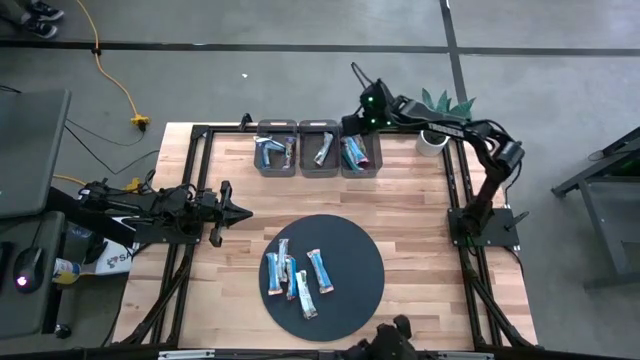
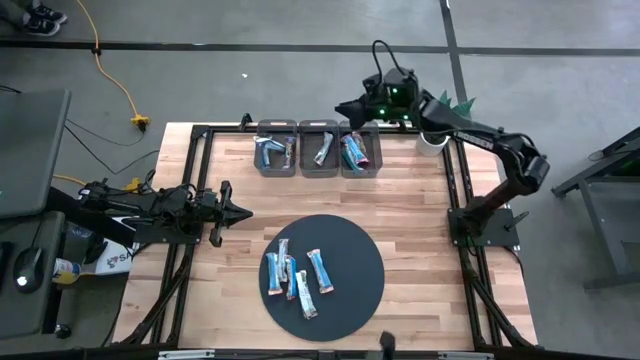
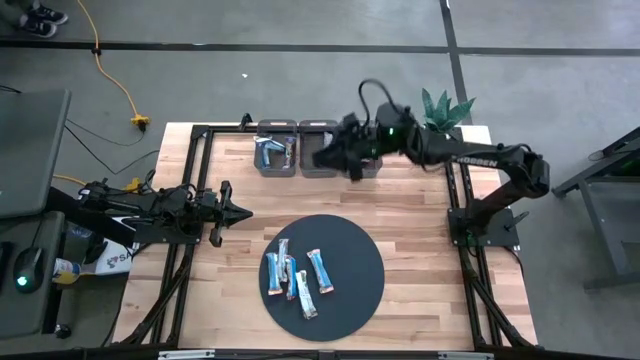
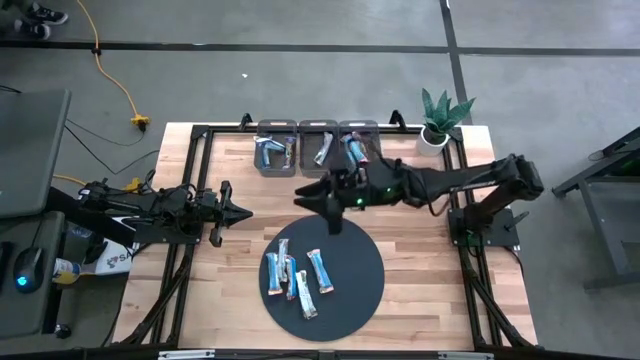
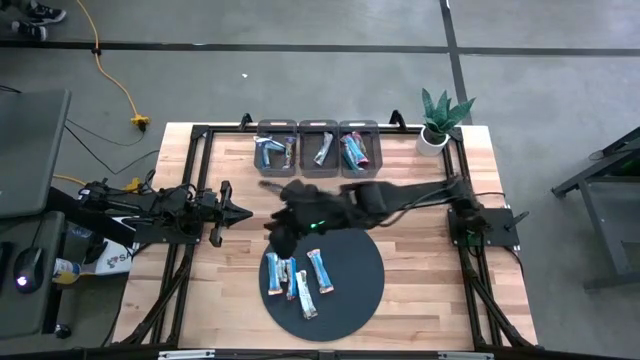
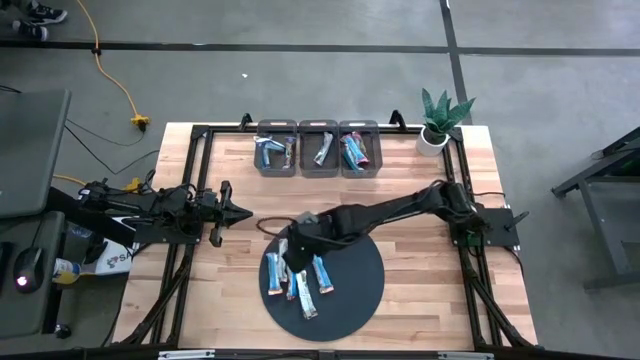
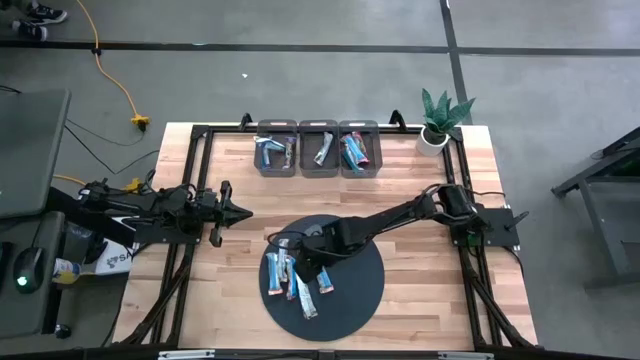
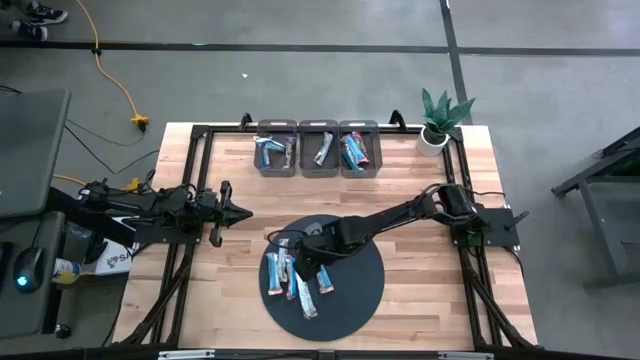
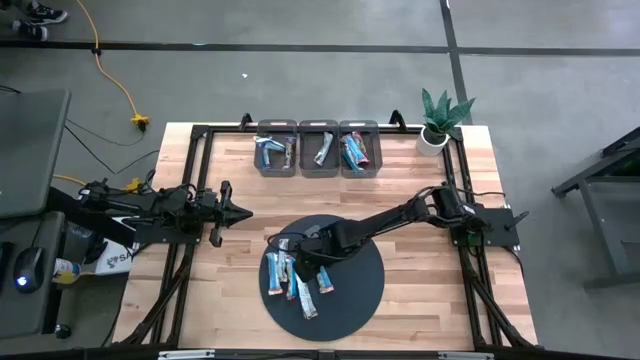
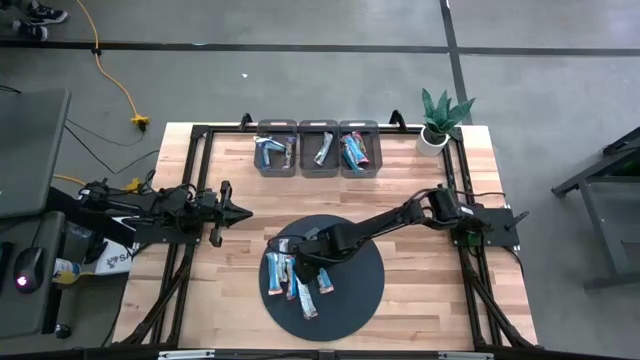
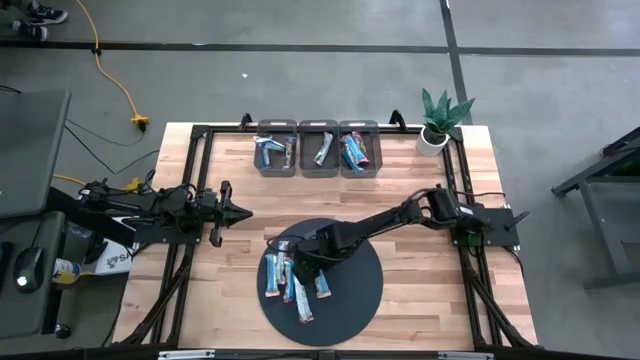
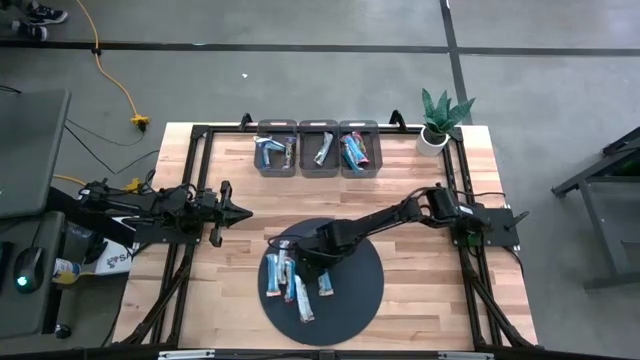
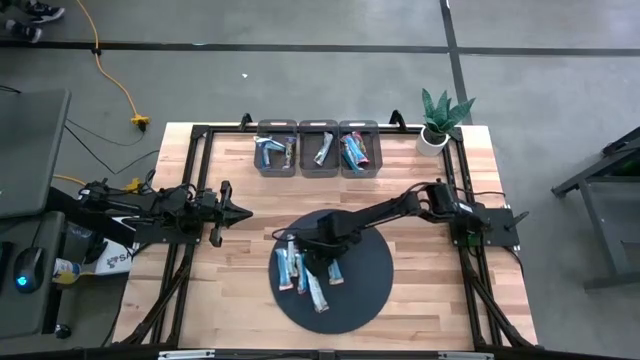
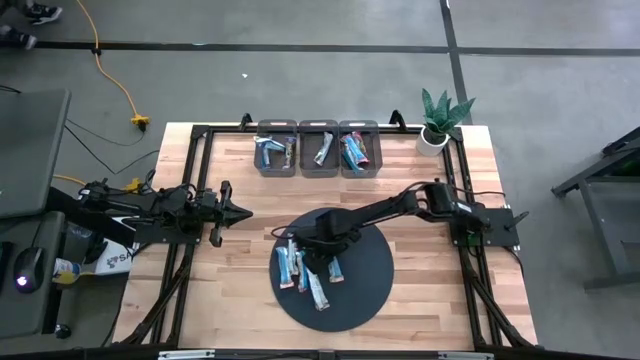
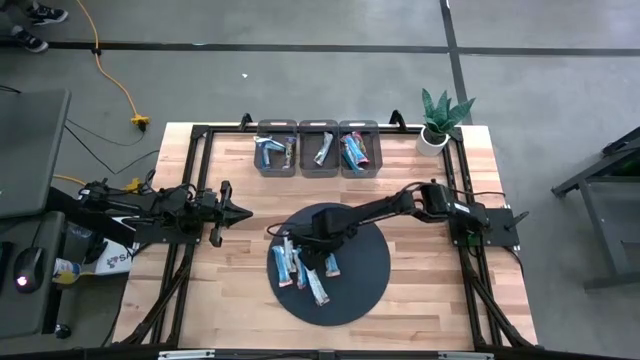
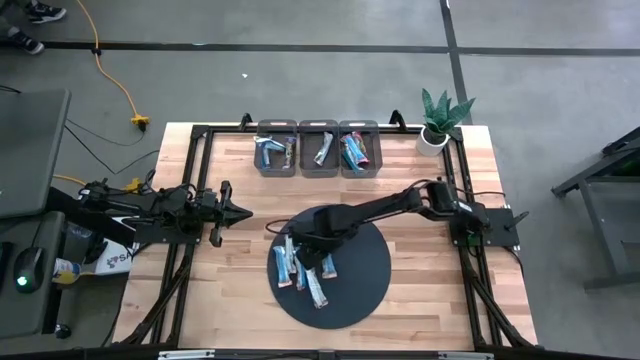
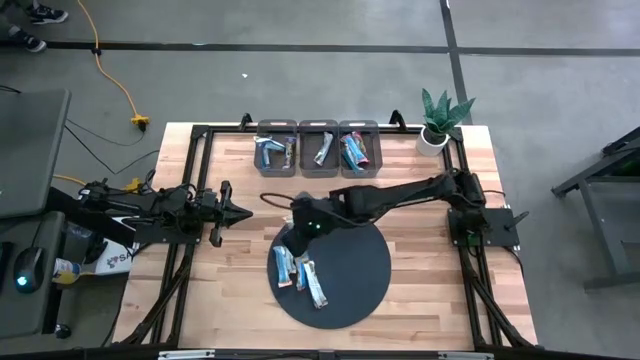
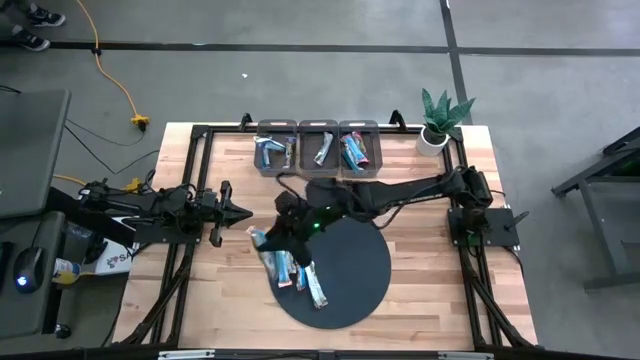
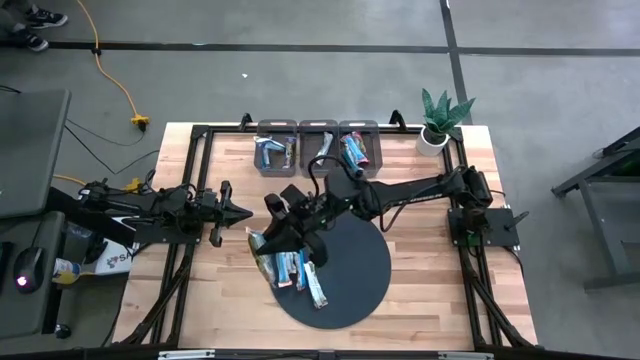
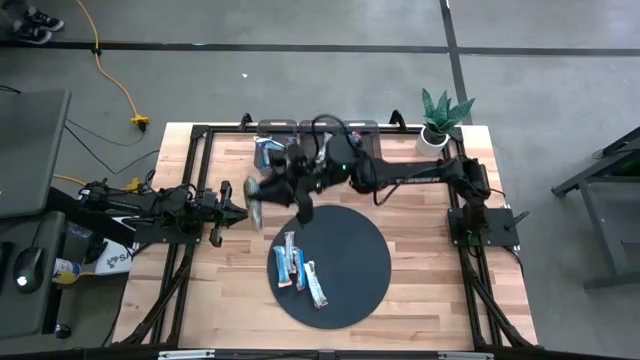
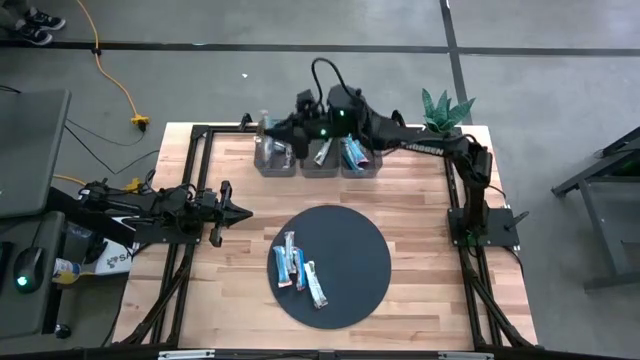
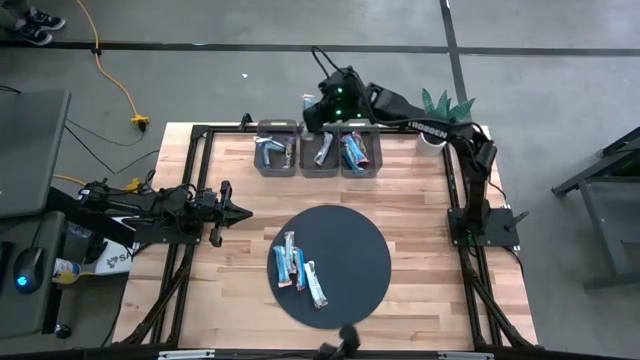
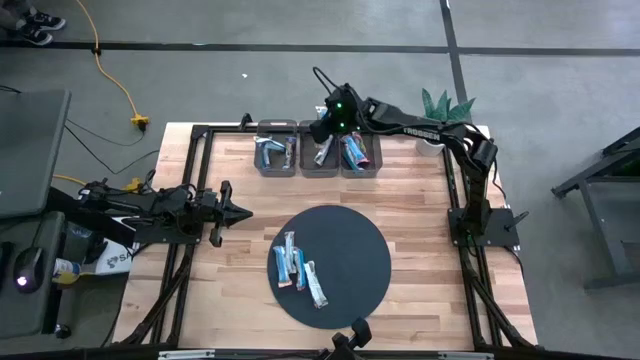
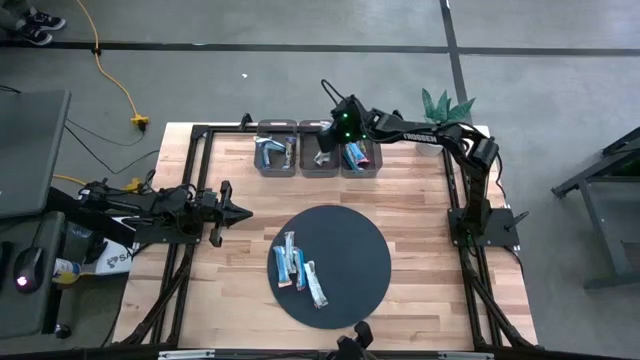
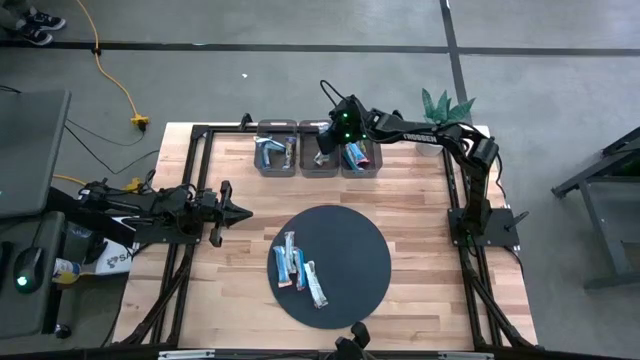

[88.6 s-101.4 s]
Task: Pick and place Granola Bars by type
Put the yellow granola bar into the middle black bin

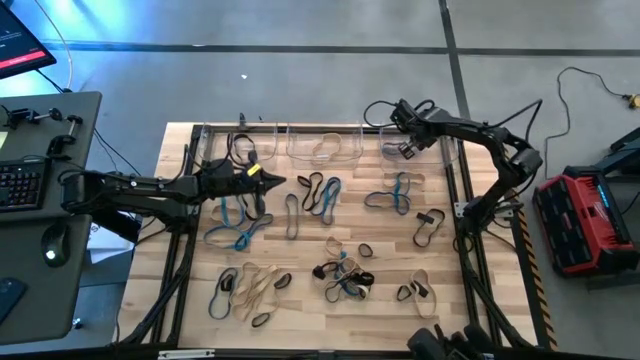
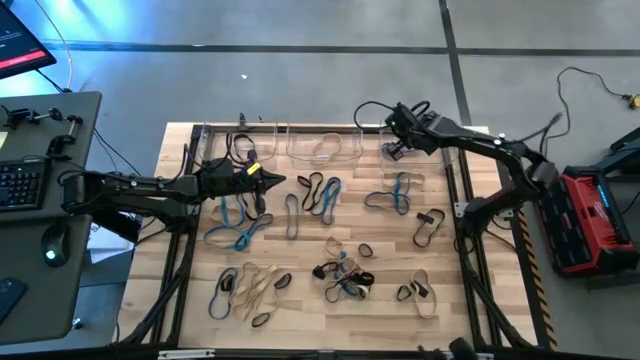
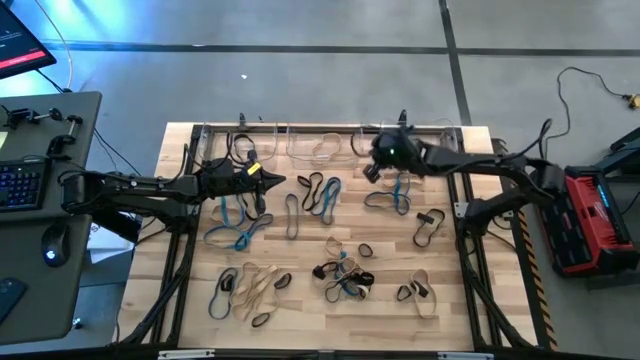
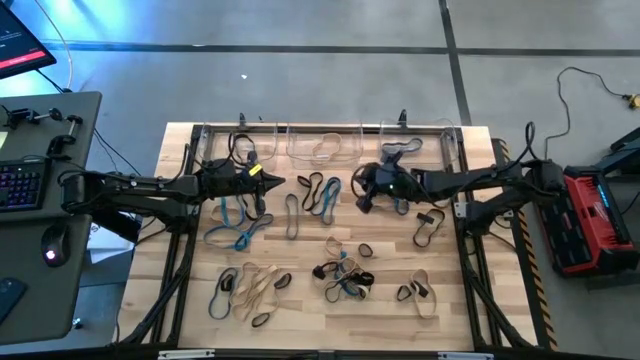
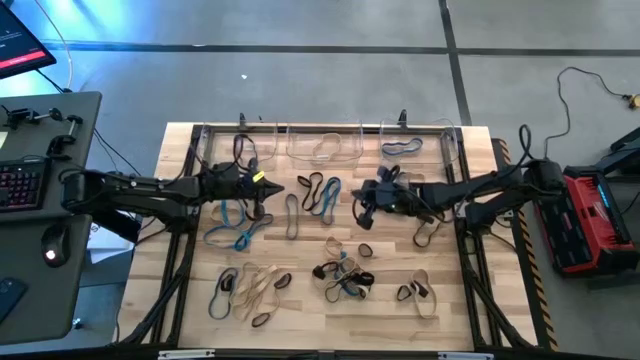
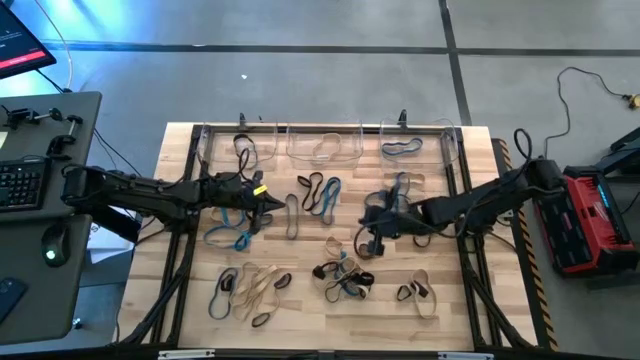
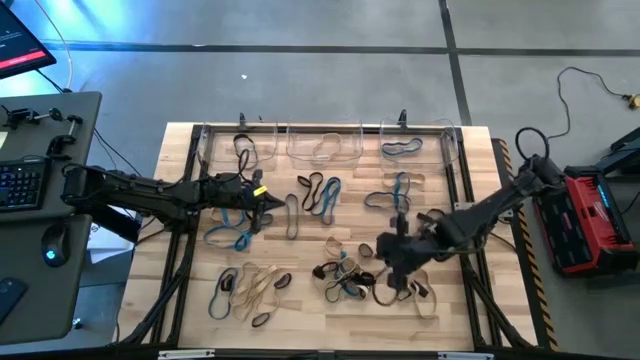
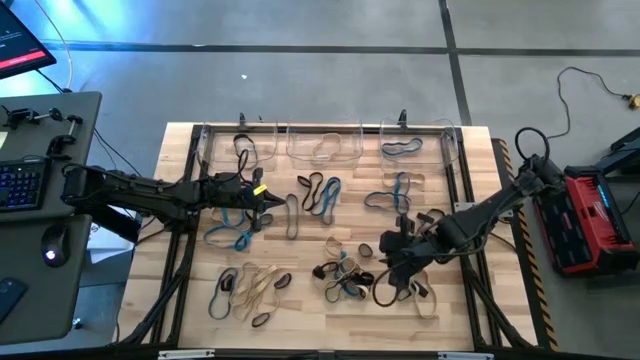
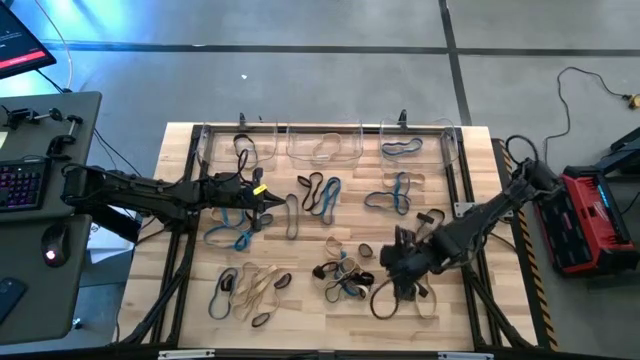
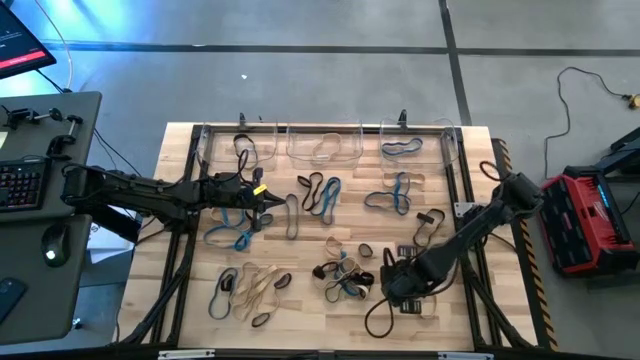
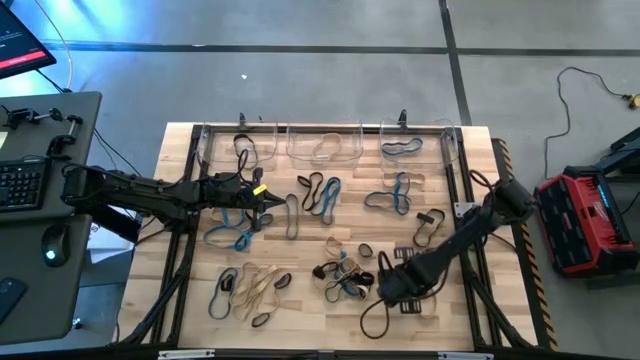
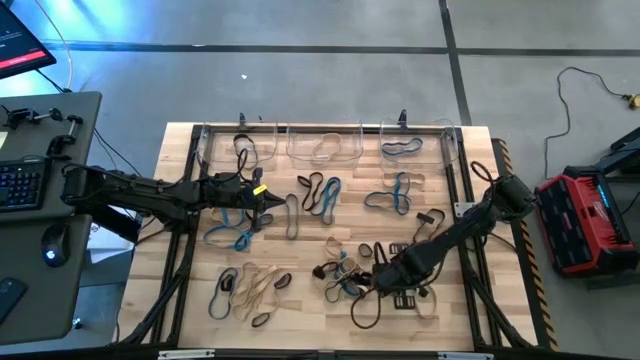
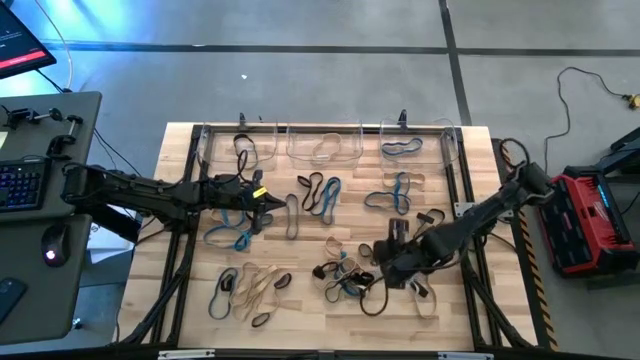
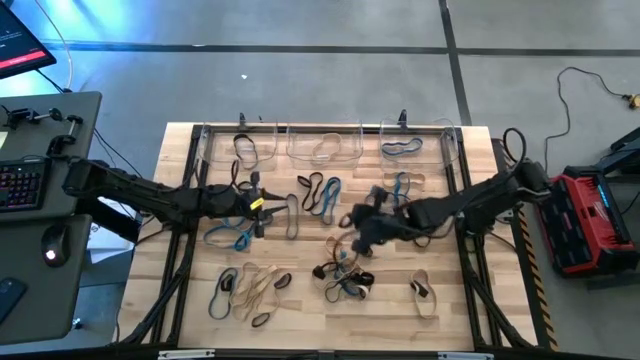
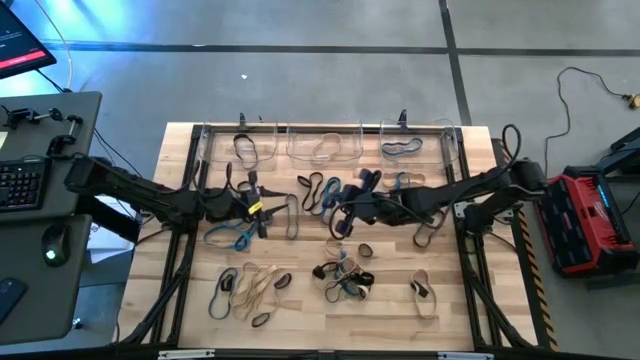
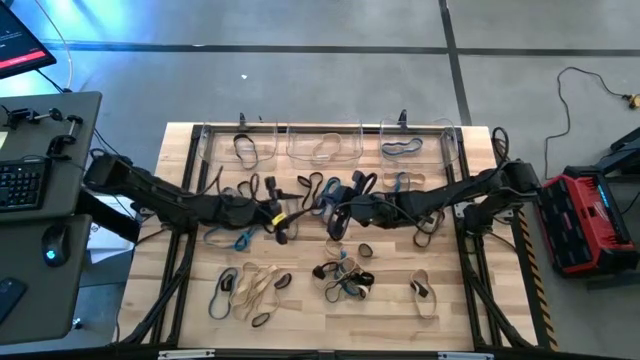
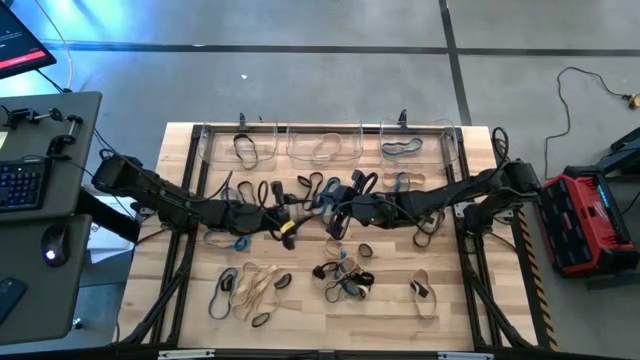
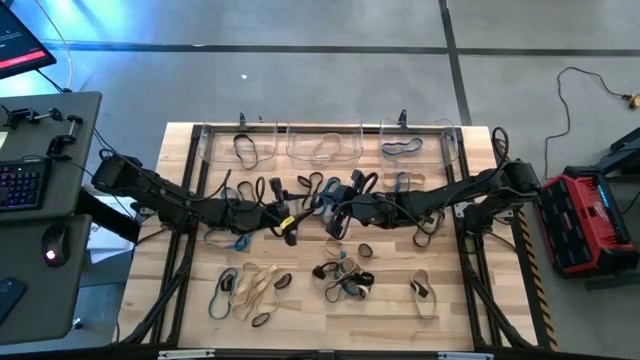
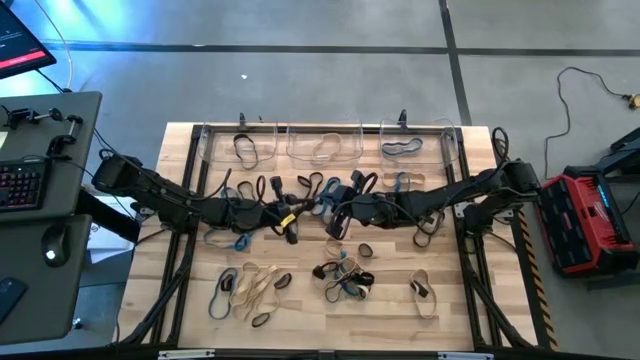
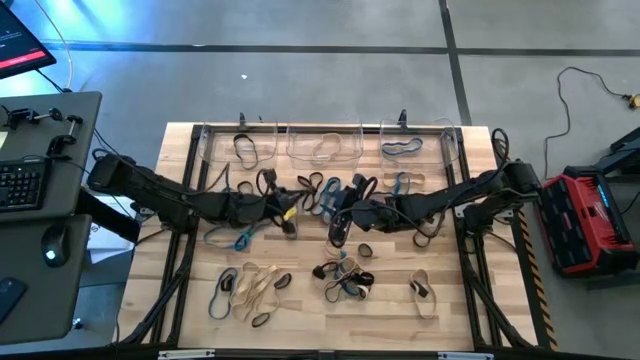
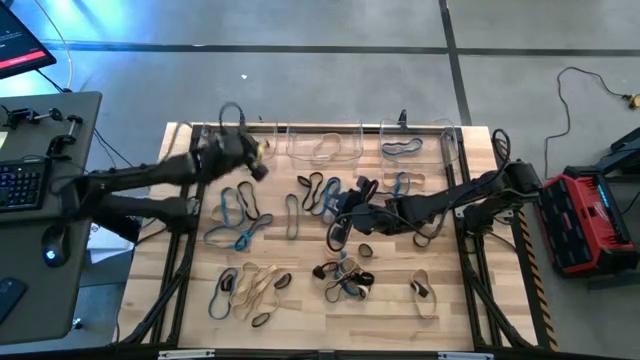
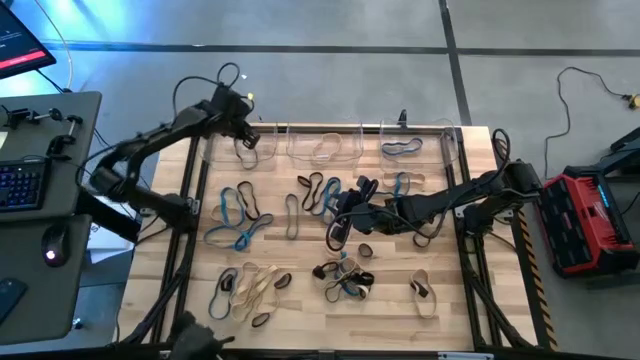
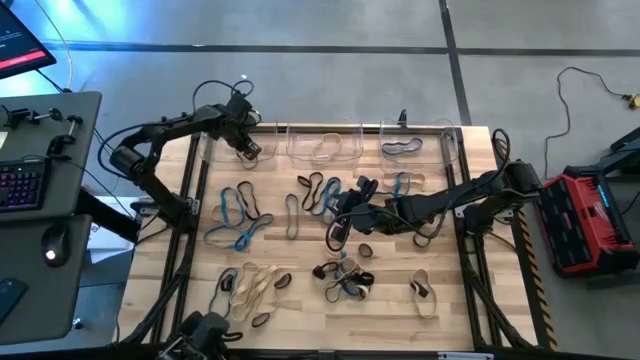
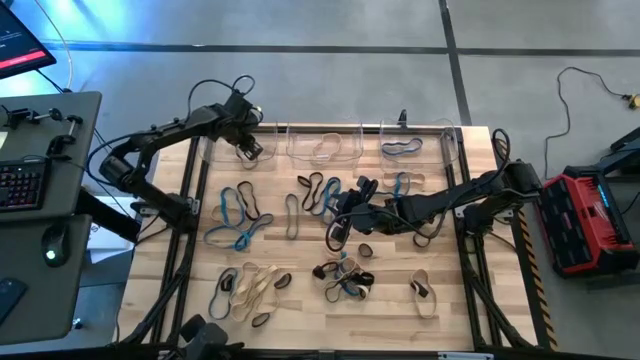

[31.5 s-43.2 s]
Task: Sort rubber bands into baskets
Put the black rubber band into the left transparent bin
